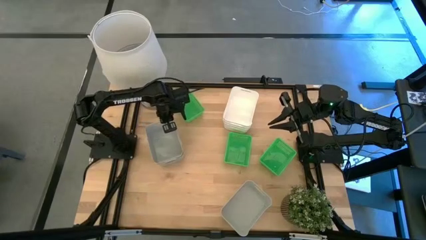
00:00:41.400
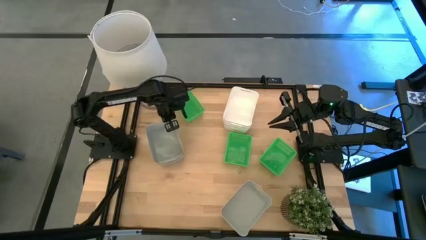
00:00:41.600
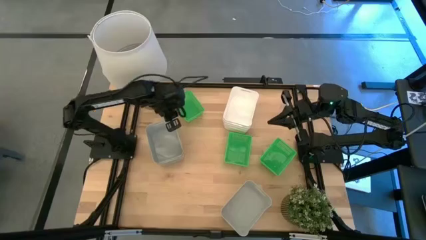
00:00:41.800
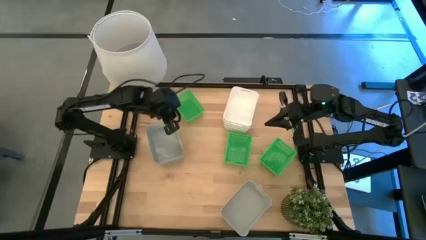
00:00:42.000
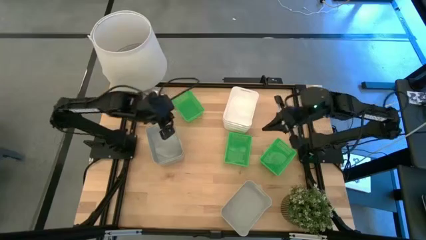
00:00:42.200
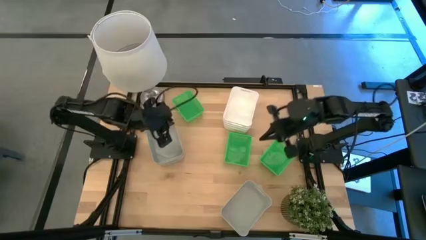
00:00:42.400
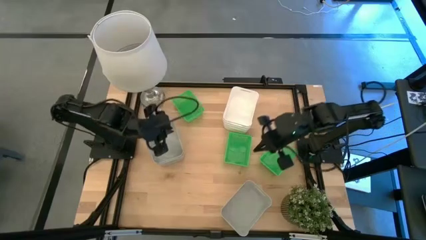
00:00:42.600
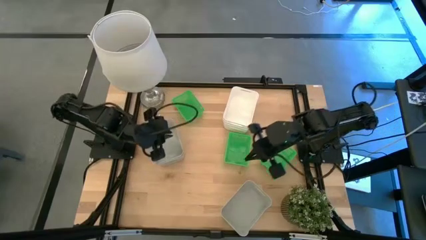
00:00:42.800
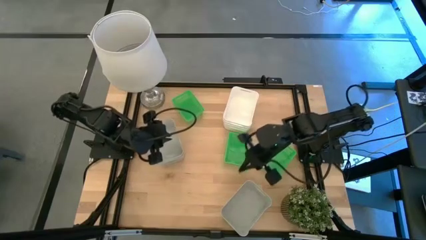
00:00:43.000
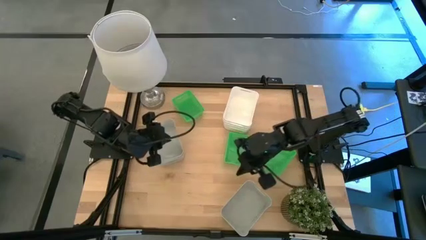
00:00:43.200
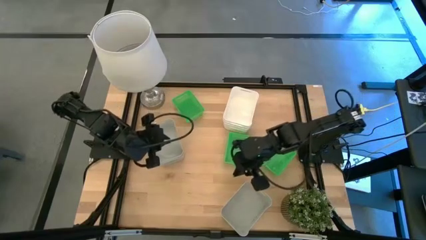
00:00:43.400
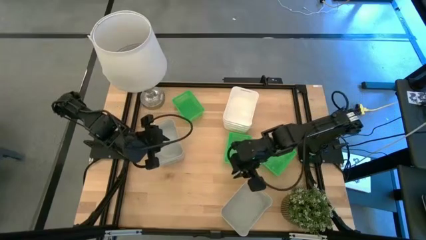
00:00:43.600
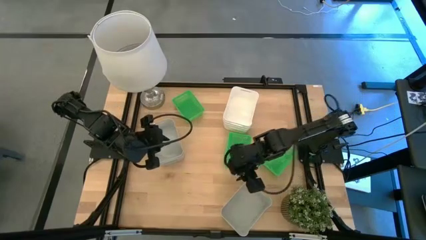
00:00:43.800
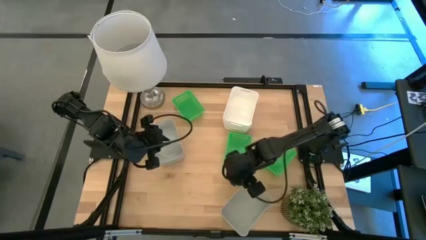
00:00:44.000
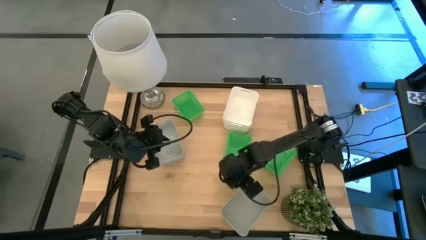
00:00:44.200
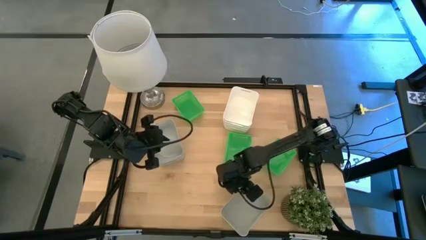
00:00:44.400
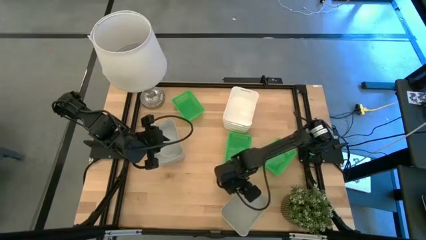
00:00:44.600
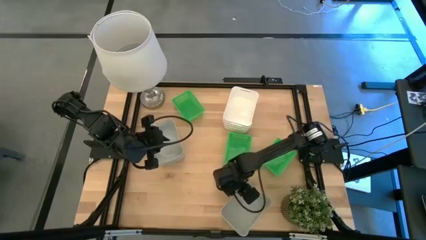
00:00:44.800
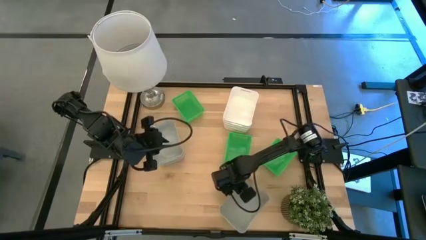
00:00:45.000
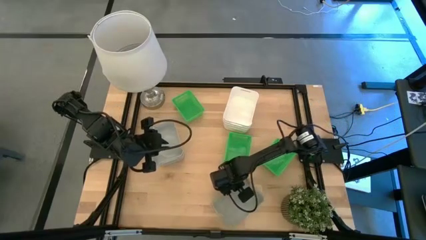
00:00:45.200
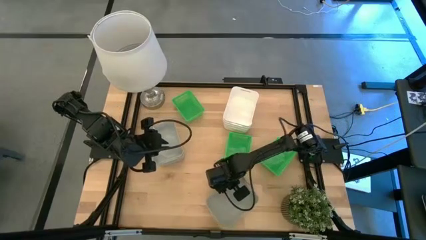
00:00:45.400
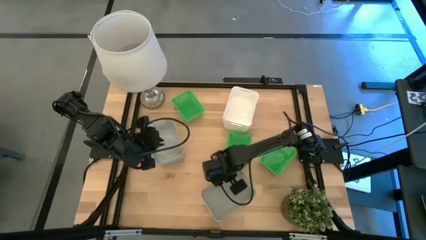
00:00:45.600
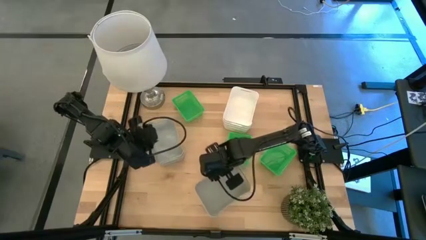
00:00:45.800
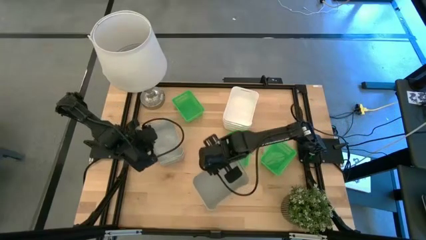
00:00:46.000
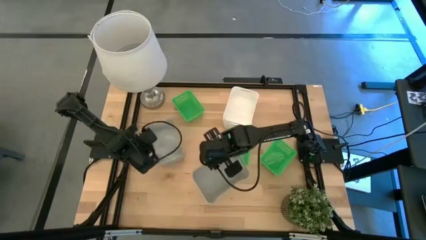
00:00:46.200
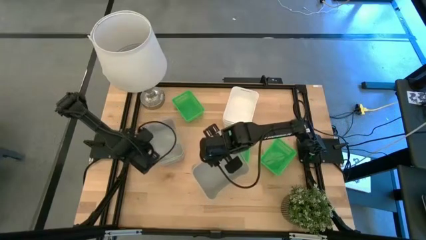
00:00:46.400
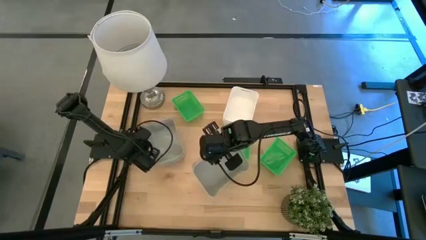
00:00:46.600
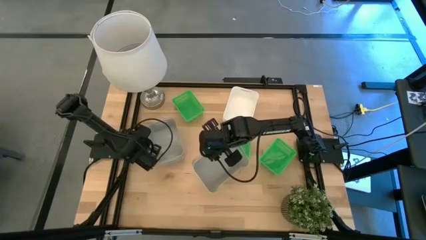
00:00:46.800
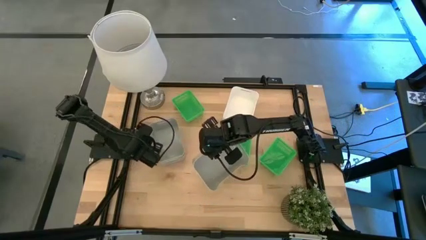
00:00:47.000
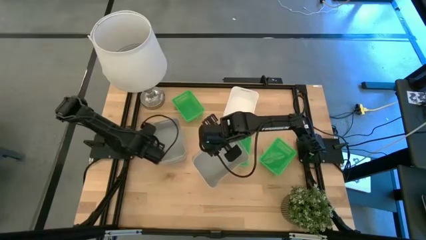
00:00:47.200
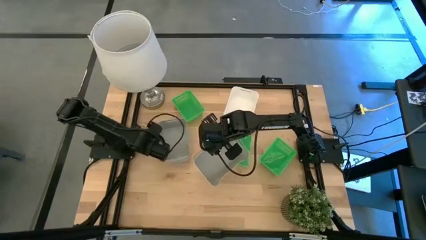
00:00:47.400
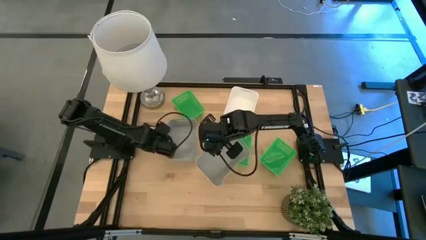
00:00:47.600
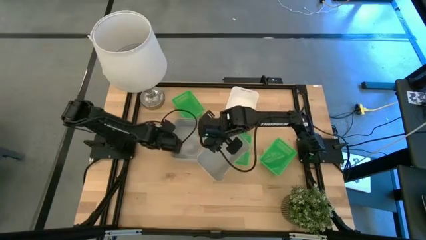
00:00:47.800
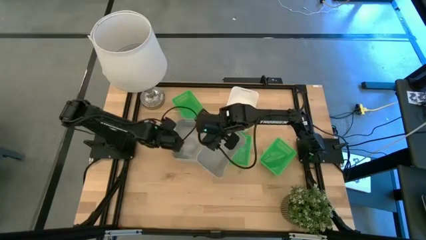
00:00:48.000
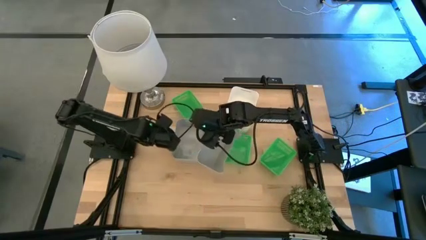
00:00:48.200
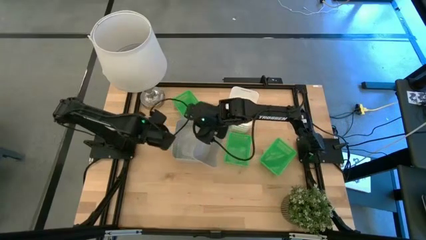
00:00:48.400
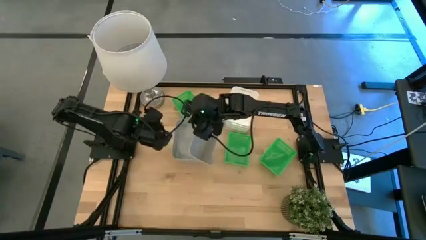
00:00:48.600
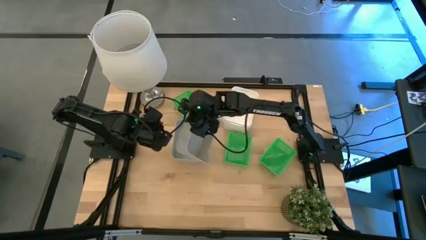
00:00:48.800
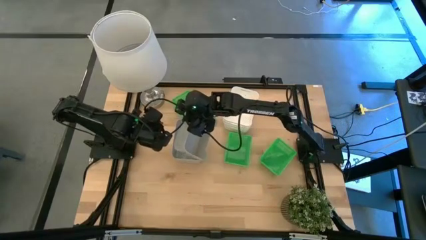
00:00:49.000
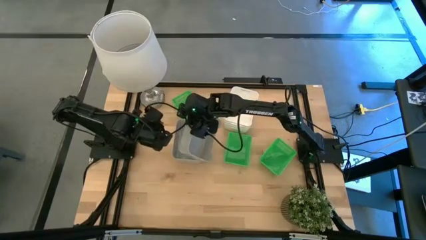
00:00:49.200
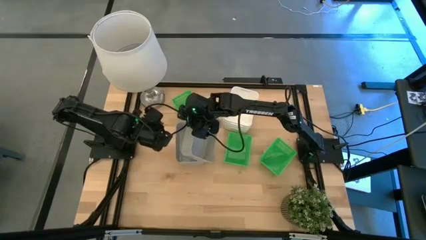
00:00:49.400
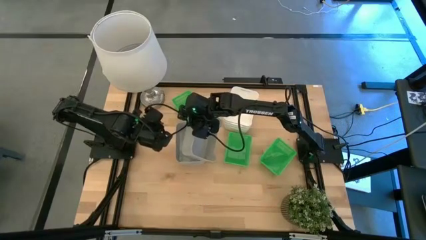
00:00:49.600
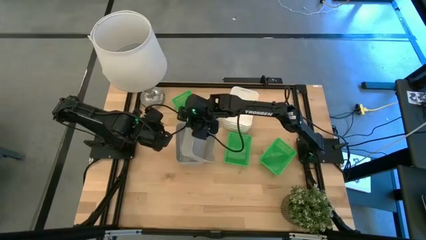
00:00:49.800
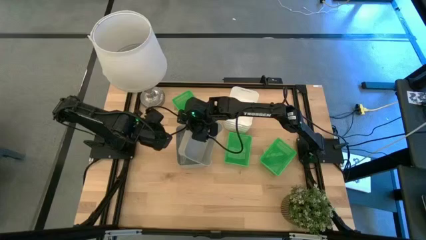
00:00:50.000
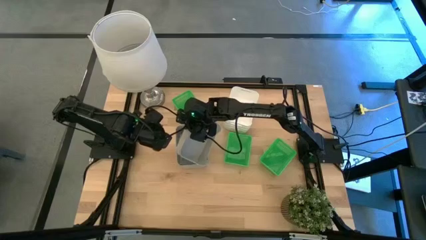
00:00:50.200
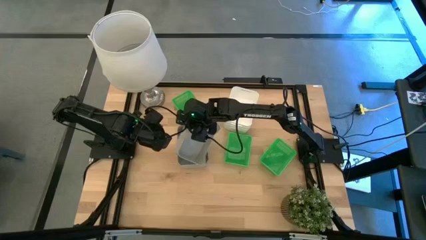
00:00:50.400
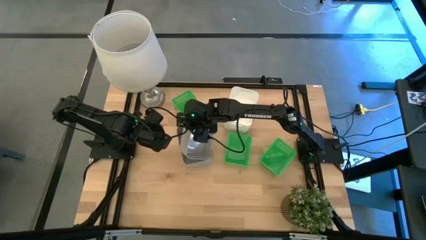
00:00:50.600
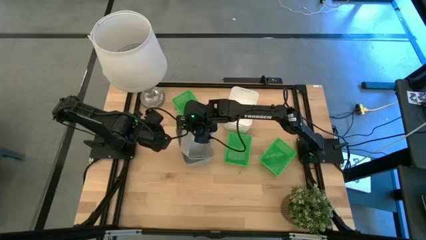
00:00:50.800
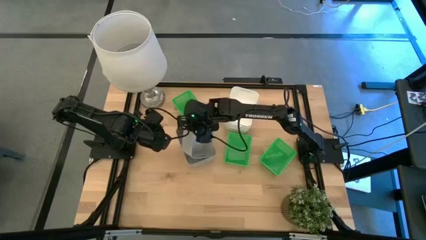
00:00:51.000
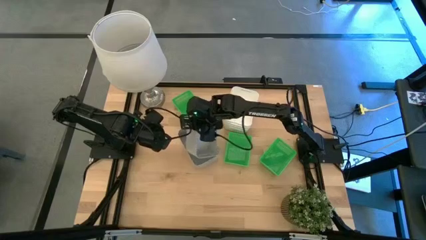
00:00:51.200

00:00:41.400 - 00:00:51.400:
Stack the bottom gray bin on top of the top gray bin
